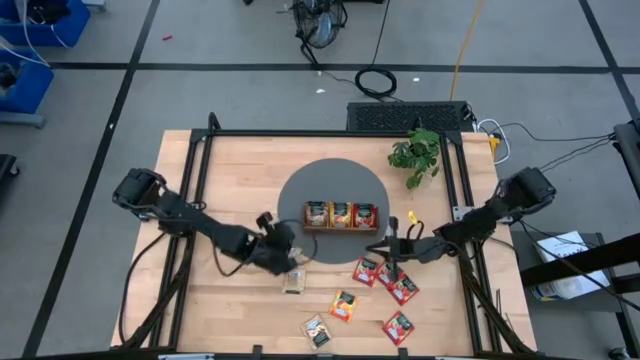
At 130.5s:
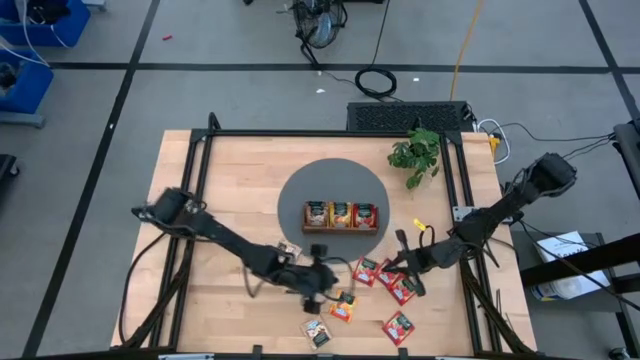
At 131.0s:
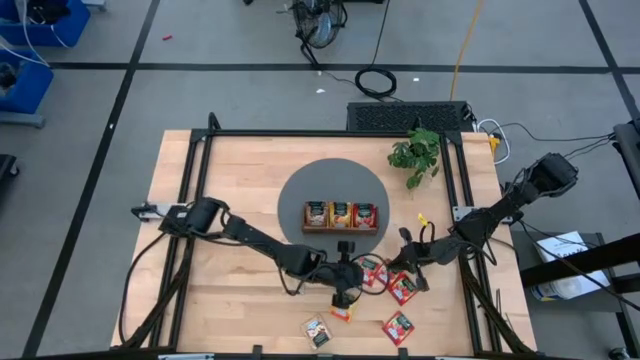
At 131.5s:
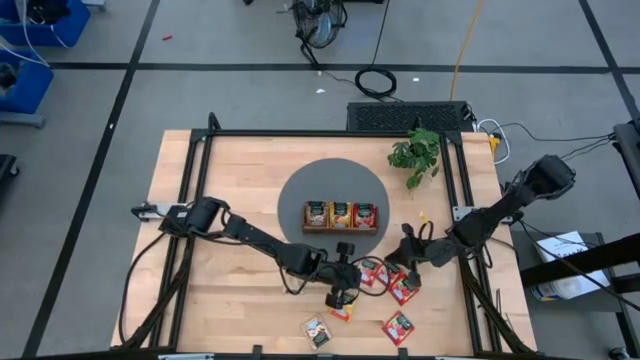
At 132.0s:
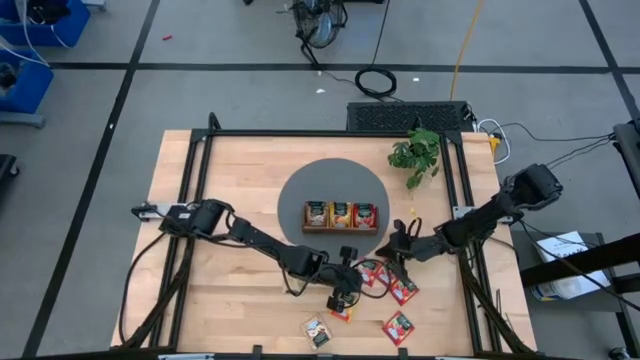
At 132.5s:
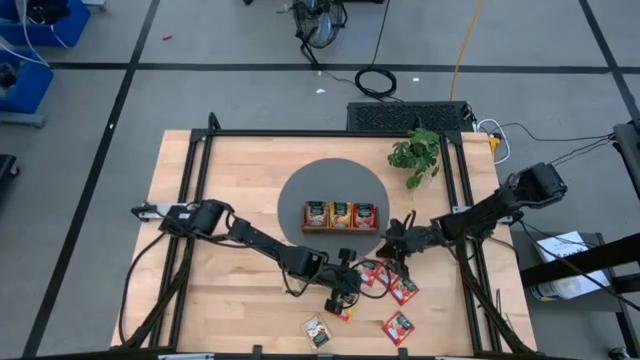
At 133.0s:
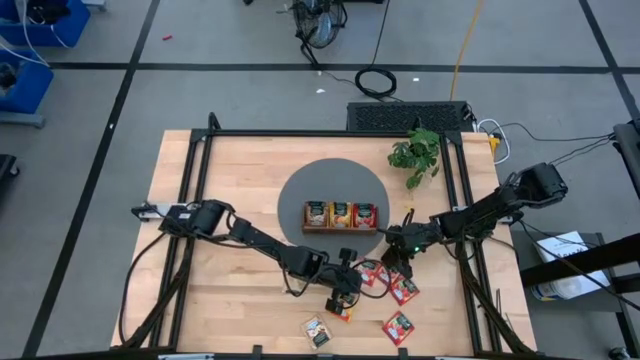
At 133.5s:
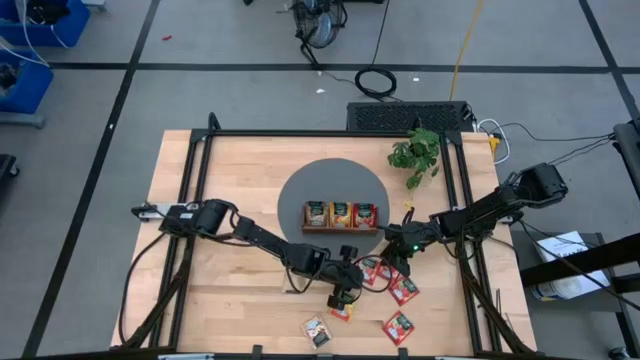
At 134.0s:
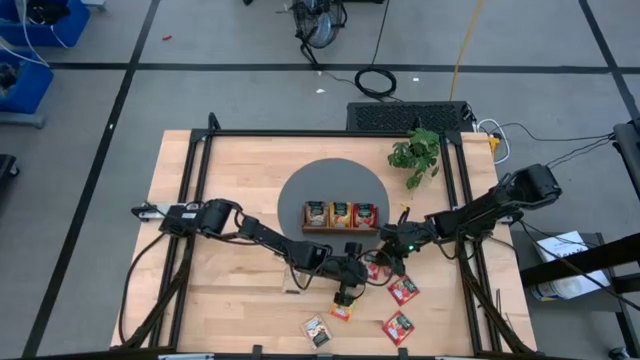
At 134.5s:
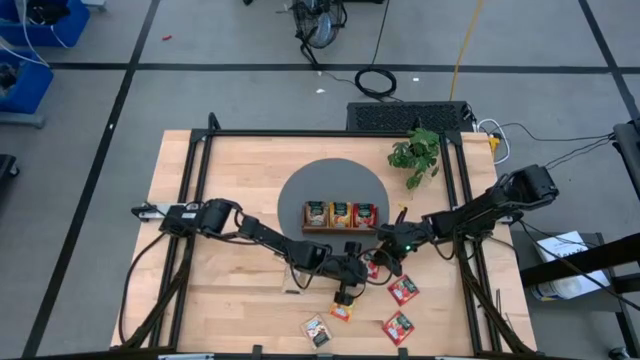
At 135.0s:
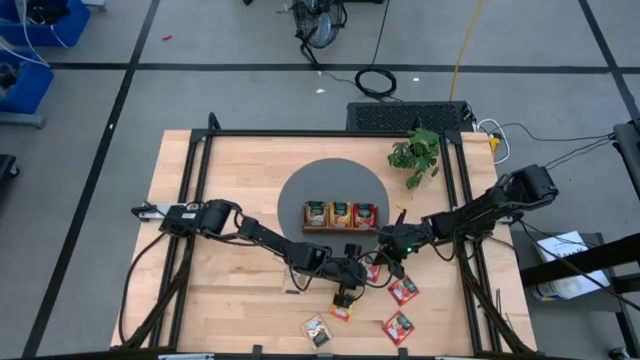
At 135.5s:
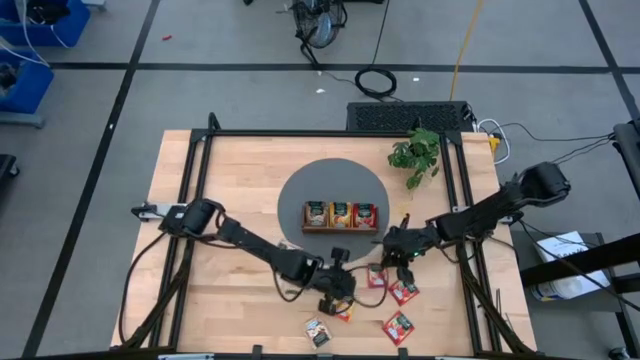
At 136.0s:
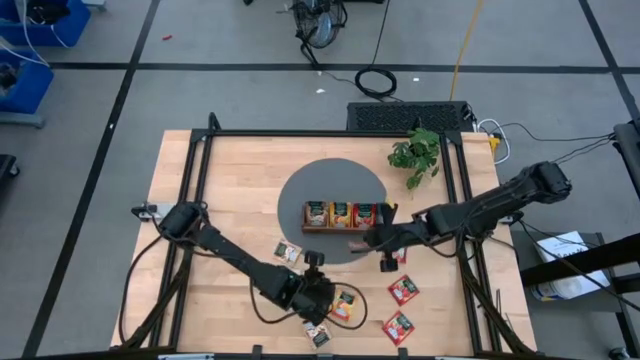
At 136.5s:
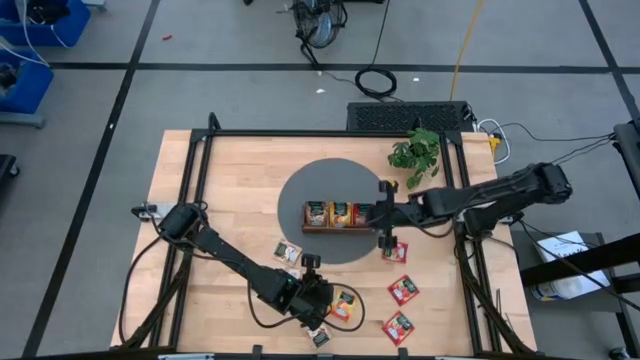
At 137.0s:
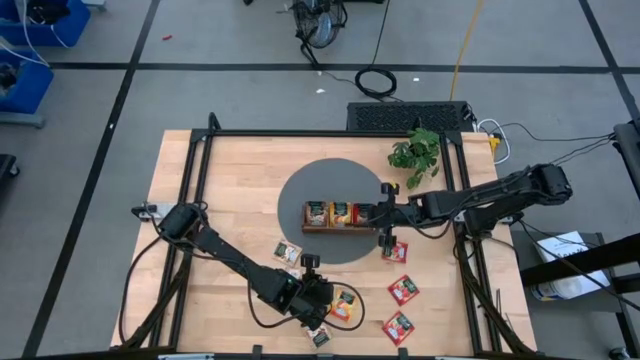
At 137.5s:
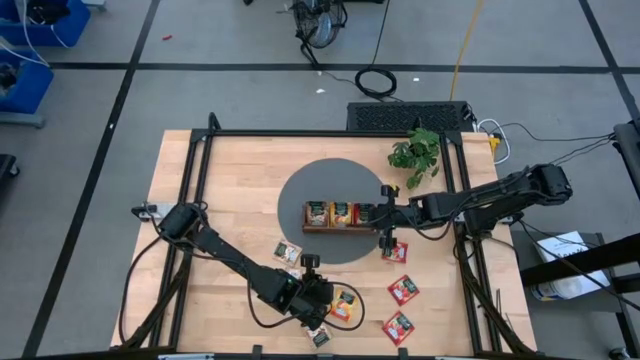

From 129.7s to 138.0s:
Task: Pick & Place Tea
Put the red tea bag into the right section of the wooden organizer

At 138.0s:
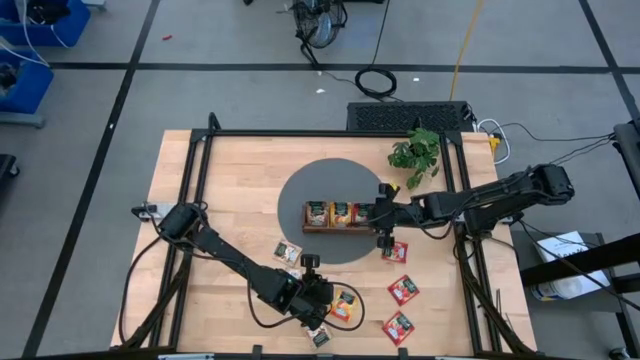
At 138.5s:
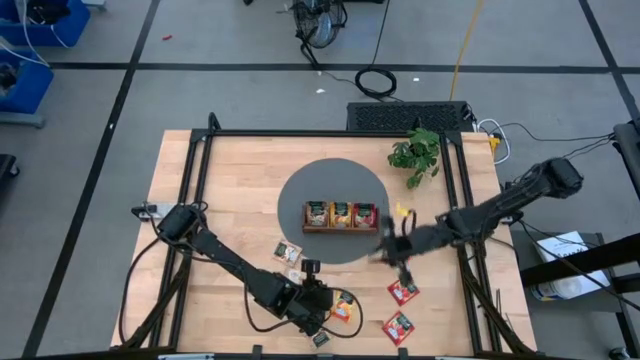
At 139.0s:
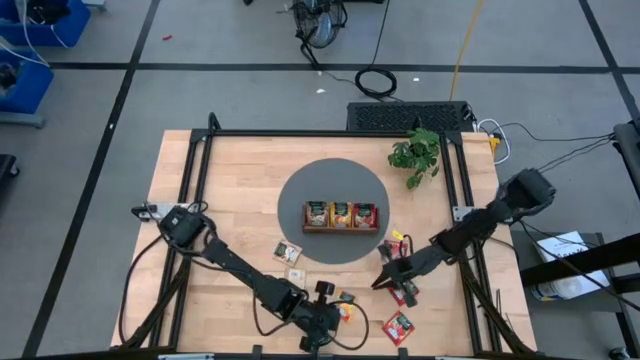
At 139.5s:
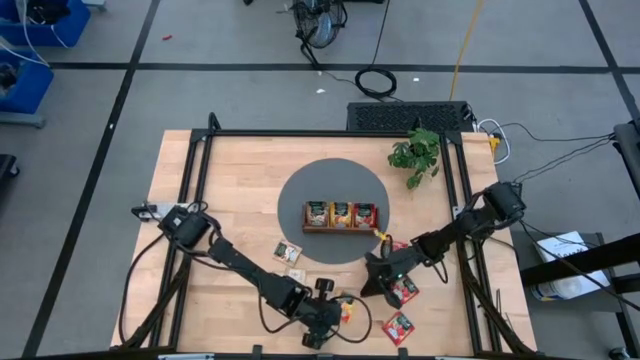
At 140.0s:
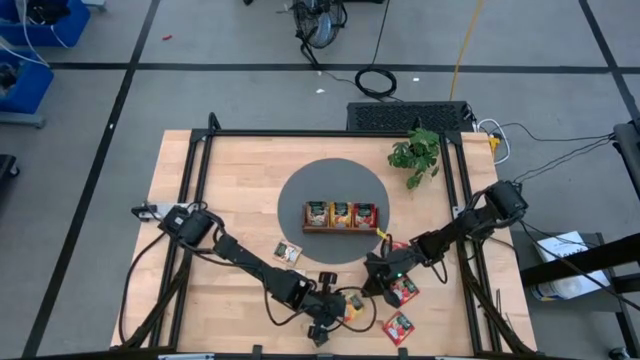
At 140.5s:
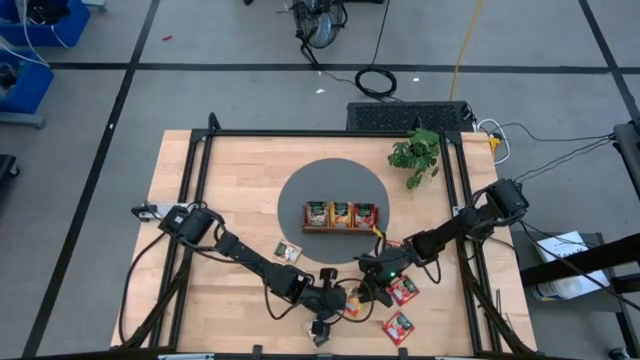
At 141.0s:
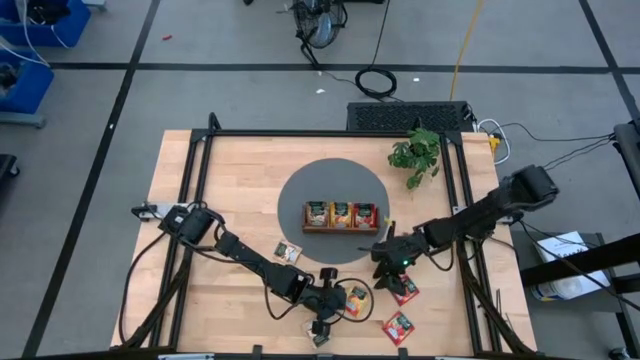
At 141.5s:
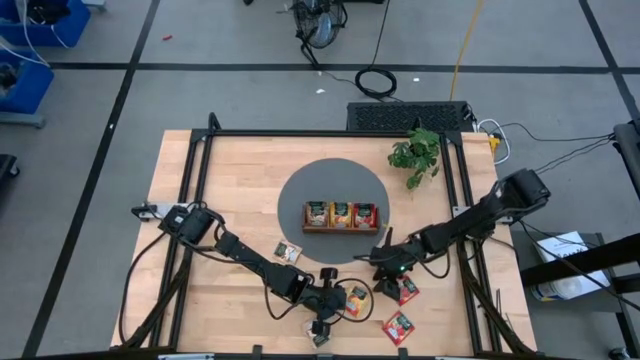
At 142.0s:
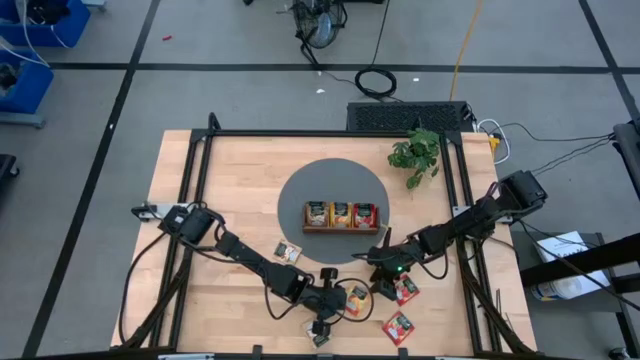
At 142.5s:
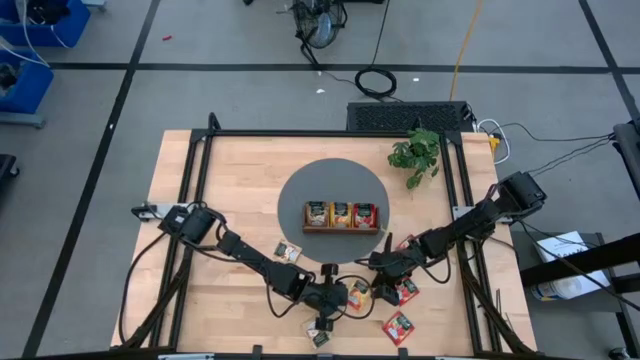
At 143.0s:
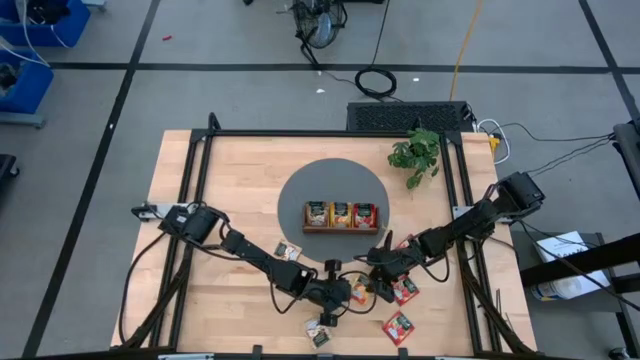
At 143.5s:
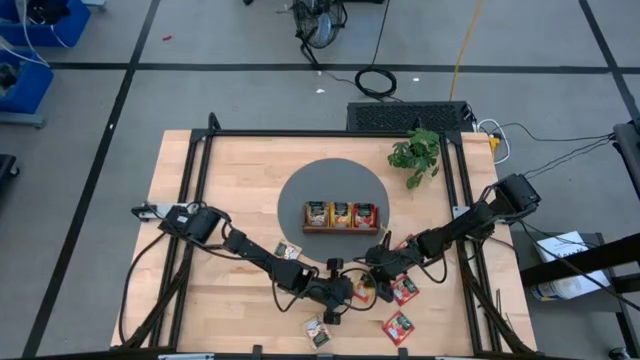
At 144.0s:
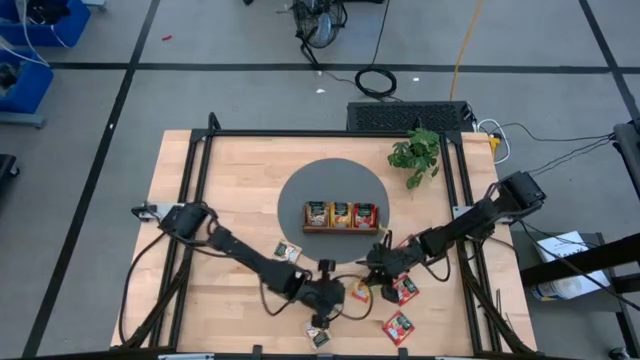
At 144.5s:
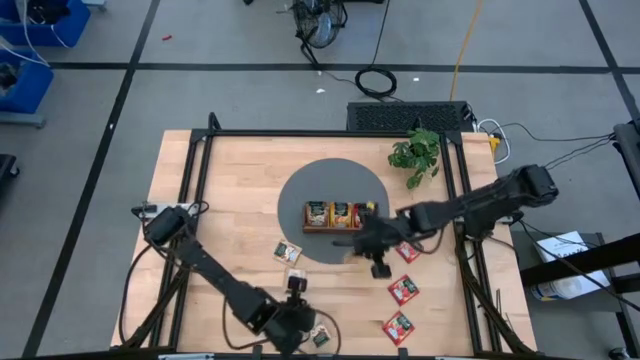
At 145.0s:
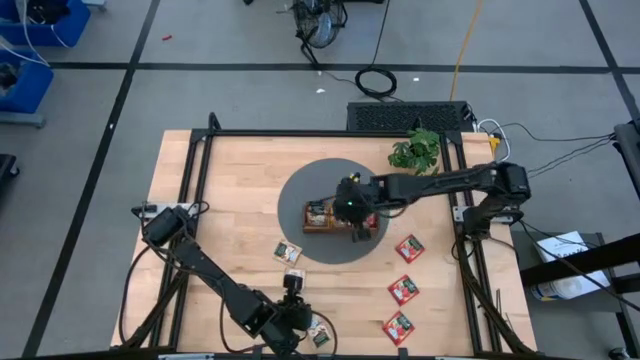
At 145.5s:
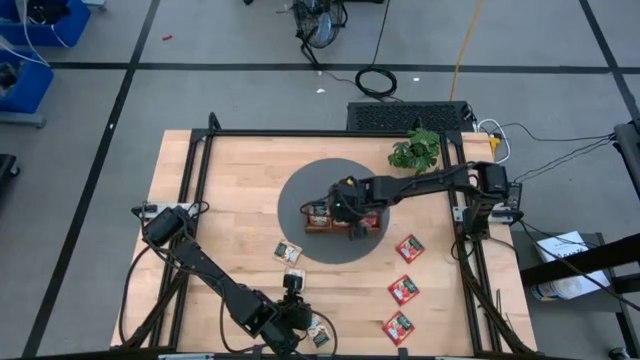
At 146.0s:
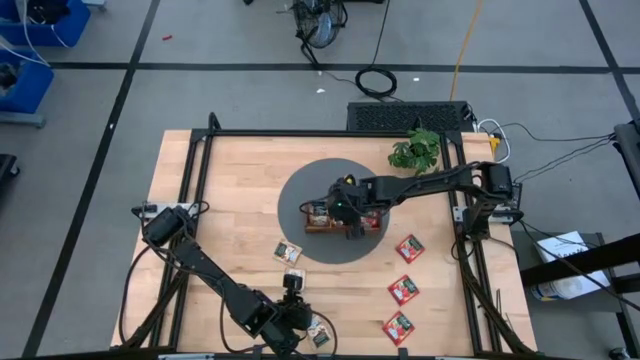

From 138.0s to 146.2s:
Put the yellow tea bag into the middle section of the wooden organizer

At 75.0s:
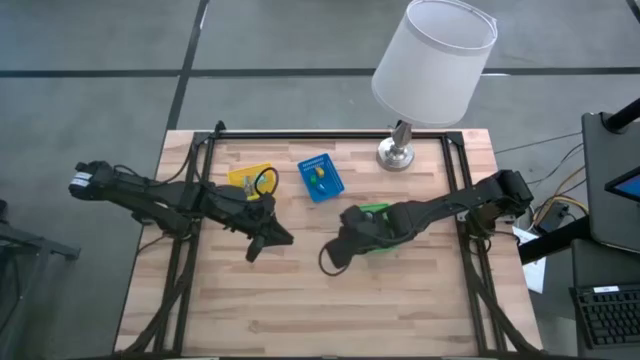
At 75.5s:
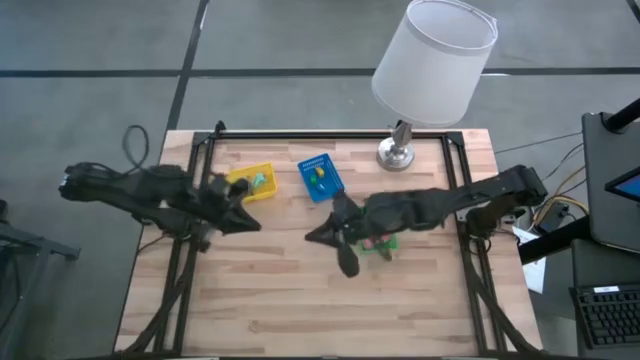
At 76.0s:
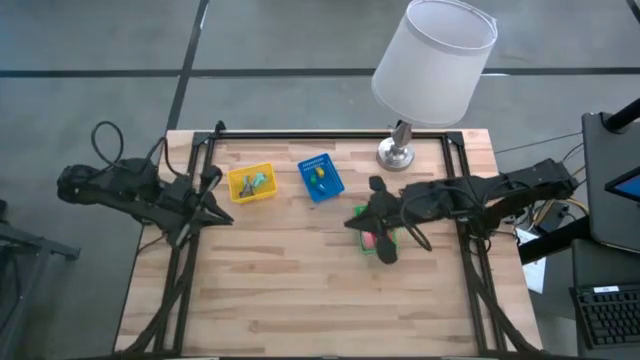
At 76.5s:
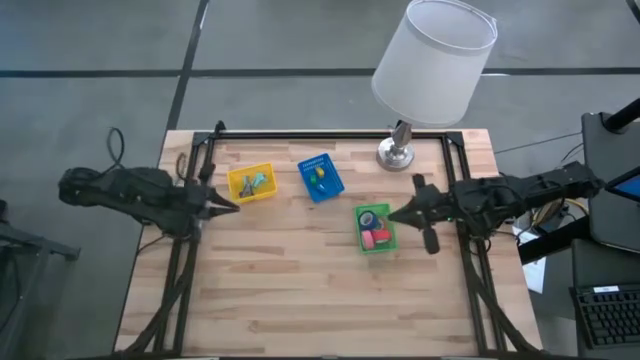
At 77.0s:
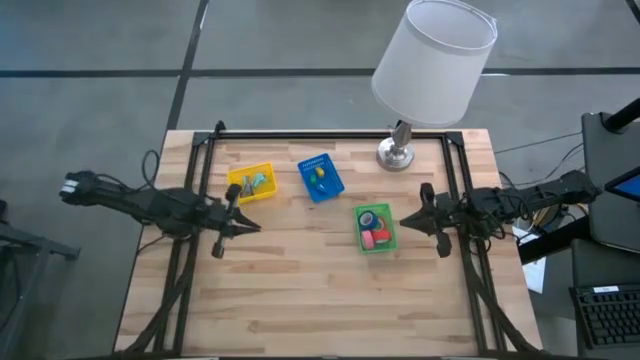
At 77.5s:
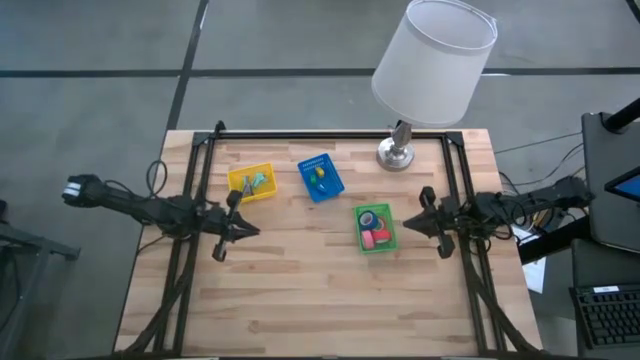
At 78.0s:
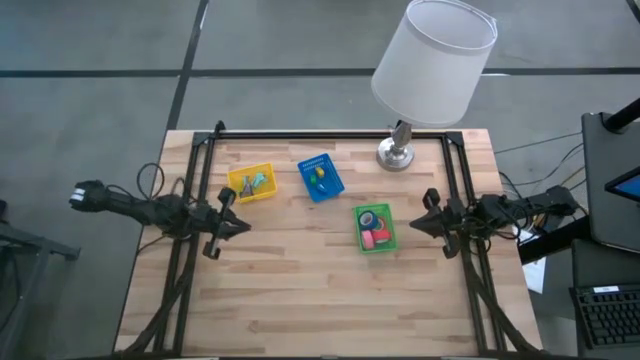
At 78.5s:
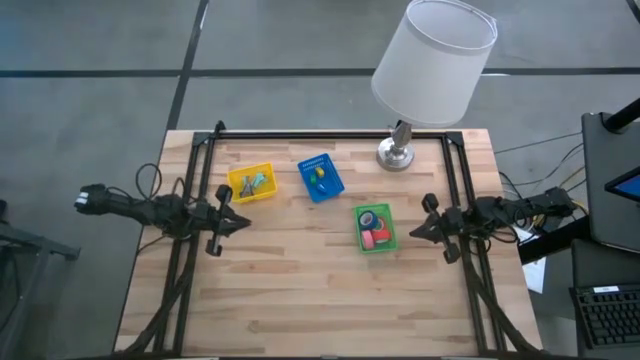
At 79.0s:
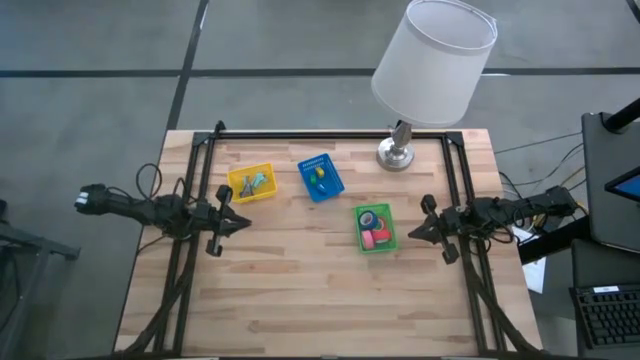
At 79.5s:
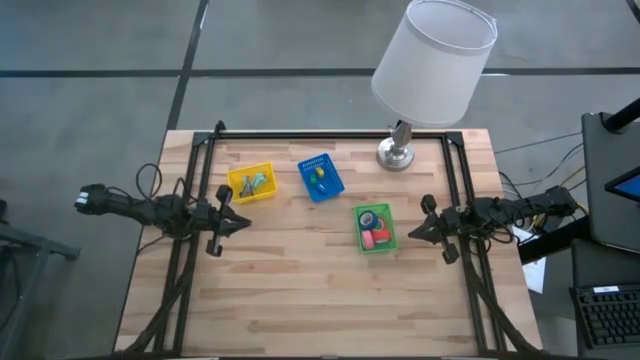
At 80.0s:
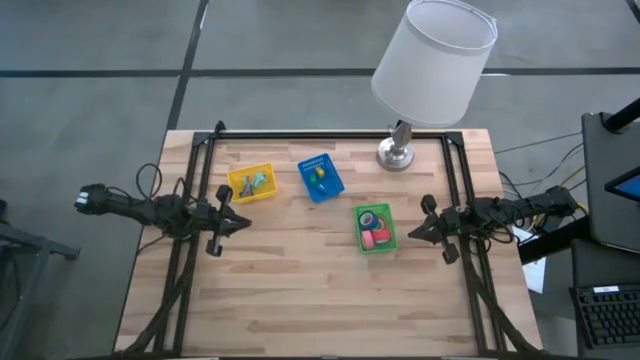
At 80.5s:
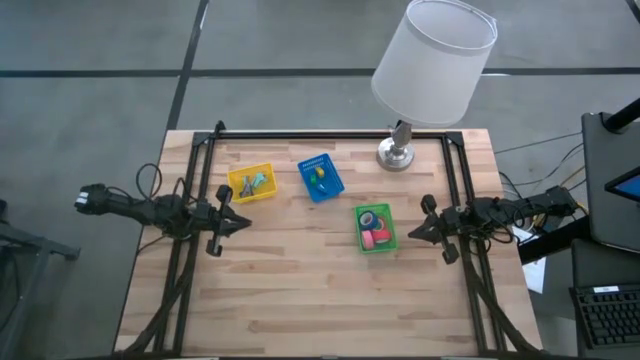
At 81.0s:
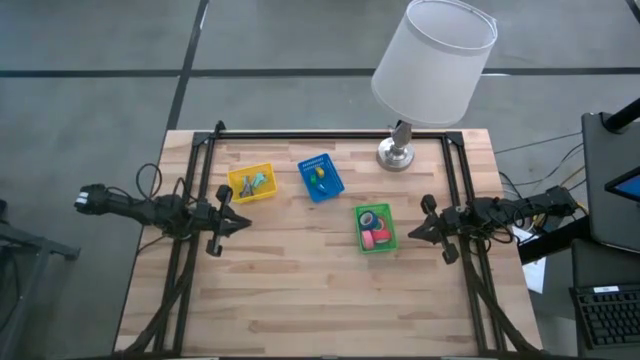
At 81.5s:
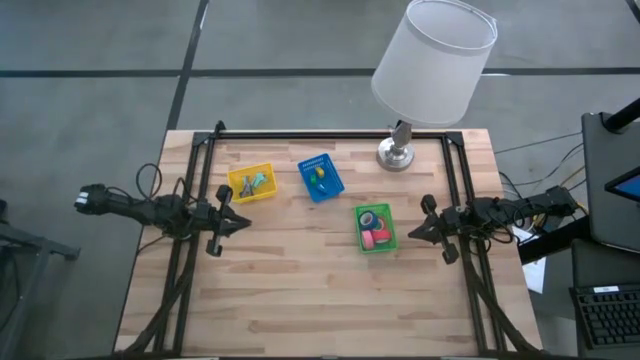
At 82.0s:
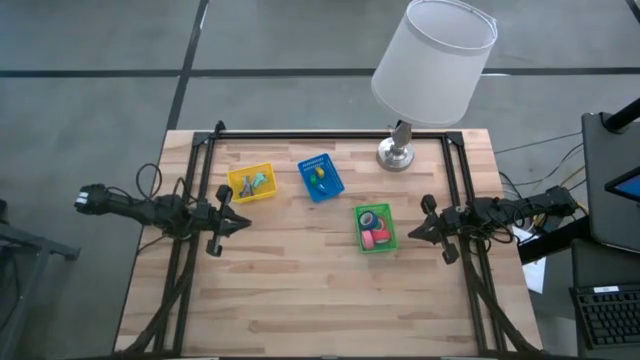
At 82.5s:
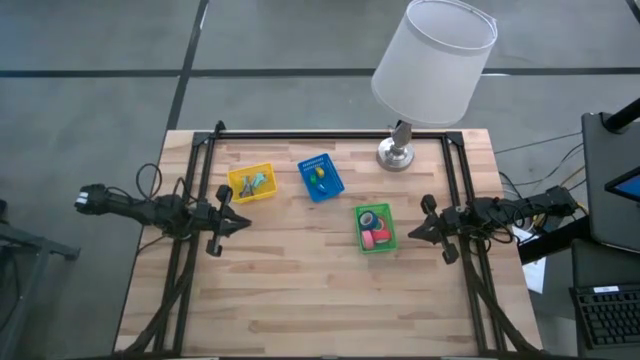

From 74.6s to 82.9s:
Task: Pick and place Stapler, Stapler remover, tape
Return to Home Position
